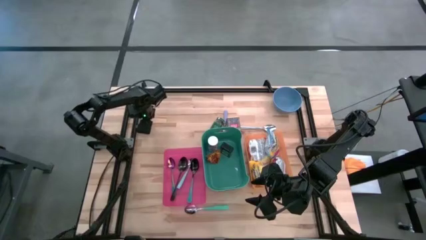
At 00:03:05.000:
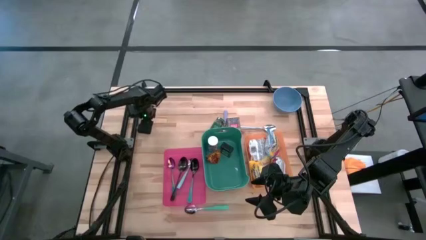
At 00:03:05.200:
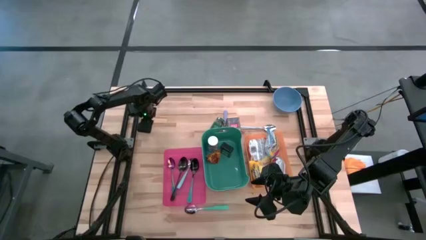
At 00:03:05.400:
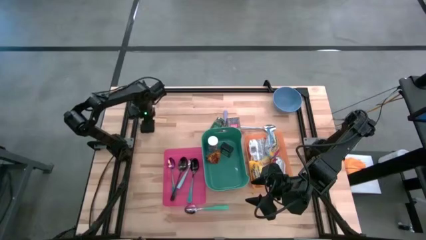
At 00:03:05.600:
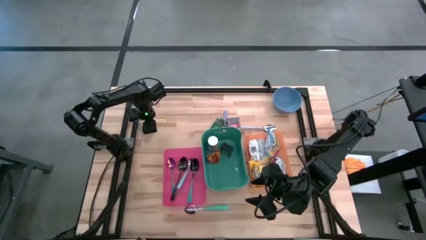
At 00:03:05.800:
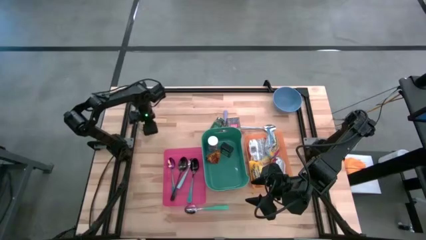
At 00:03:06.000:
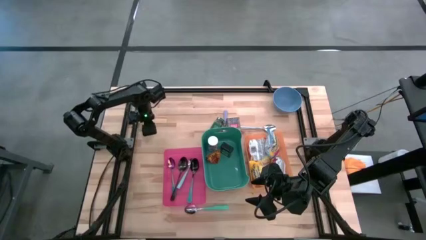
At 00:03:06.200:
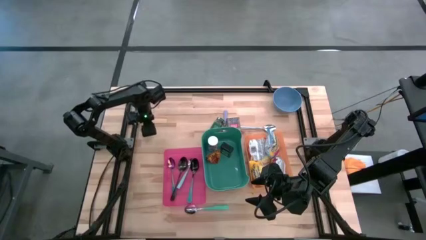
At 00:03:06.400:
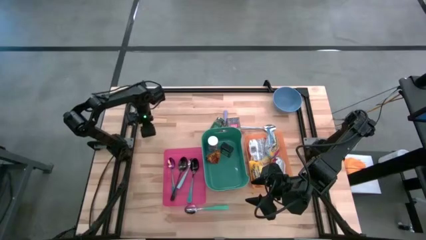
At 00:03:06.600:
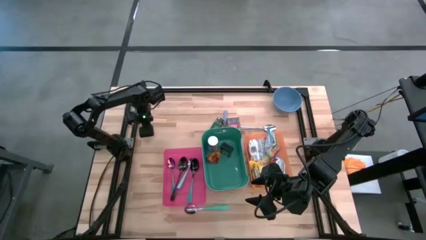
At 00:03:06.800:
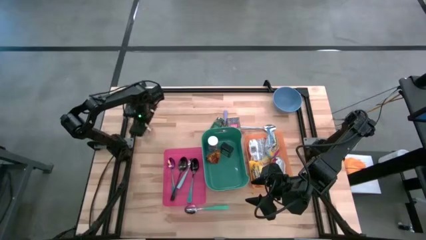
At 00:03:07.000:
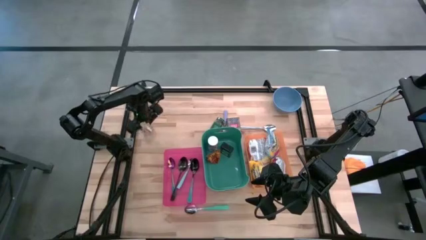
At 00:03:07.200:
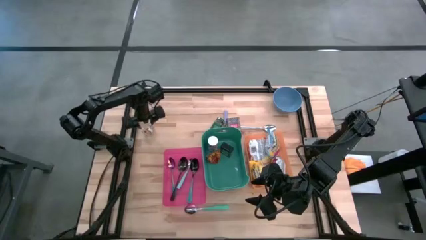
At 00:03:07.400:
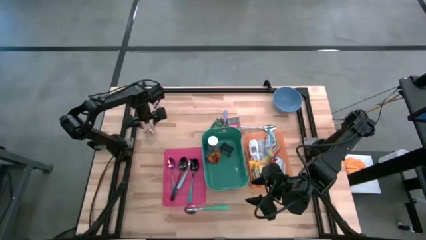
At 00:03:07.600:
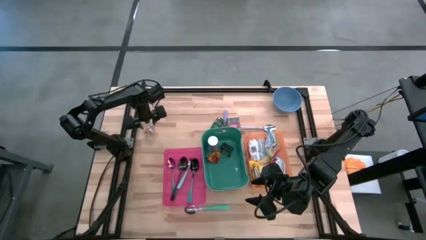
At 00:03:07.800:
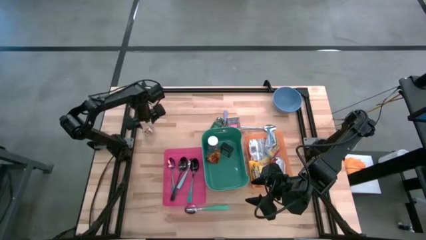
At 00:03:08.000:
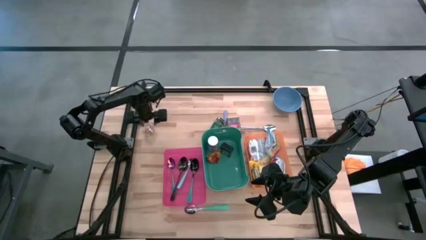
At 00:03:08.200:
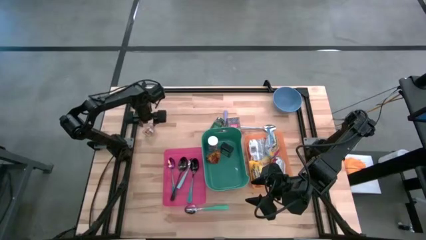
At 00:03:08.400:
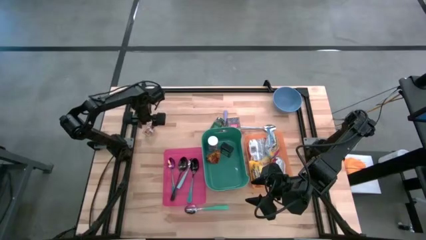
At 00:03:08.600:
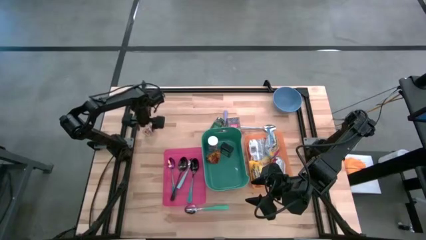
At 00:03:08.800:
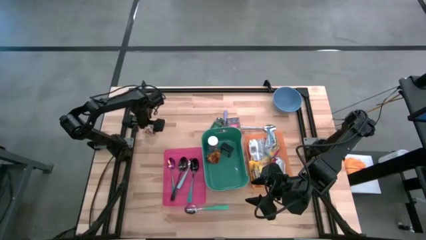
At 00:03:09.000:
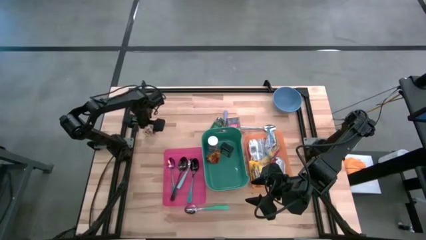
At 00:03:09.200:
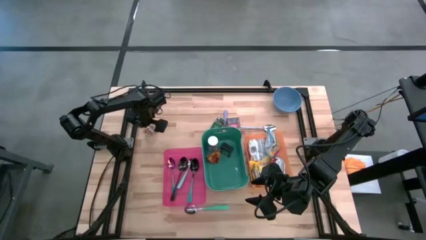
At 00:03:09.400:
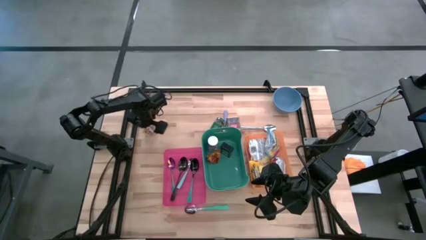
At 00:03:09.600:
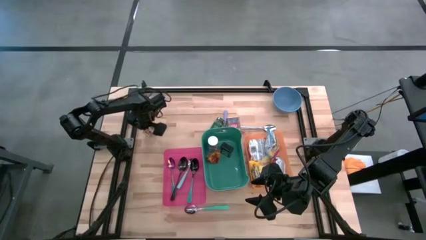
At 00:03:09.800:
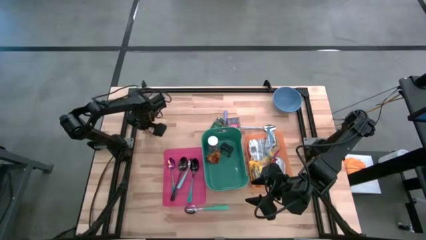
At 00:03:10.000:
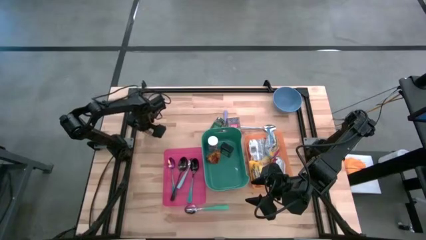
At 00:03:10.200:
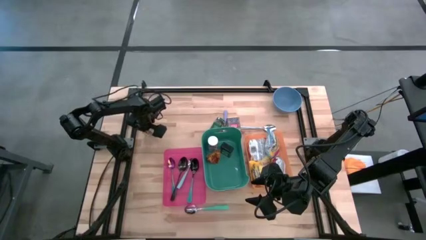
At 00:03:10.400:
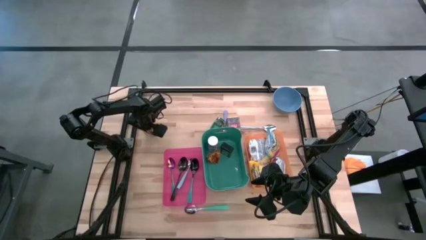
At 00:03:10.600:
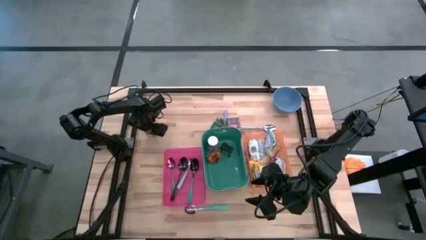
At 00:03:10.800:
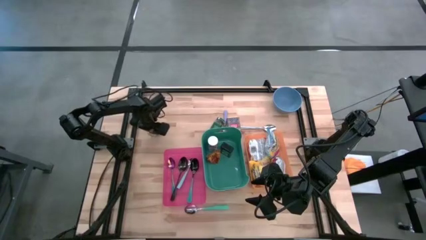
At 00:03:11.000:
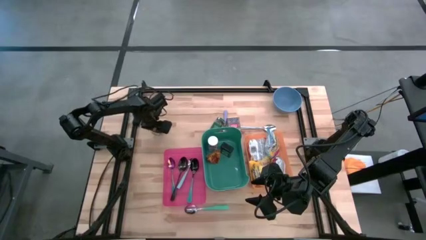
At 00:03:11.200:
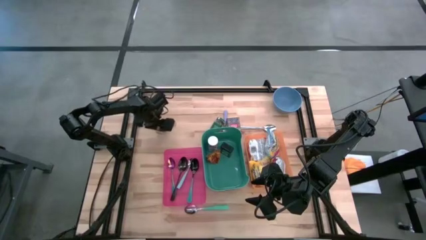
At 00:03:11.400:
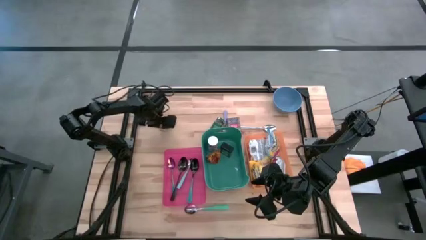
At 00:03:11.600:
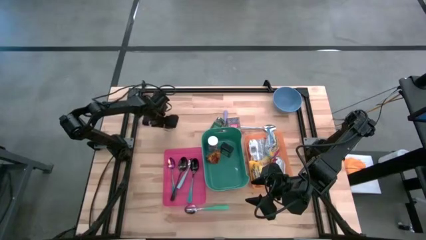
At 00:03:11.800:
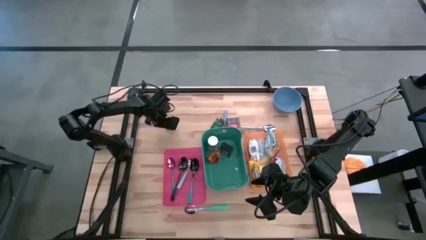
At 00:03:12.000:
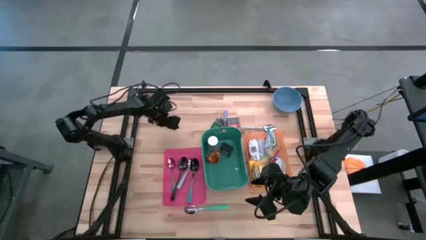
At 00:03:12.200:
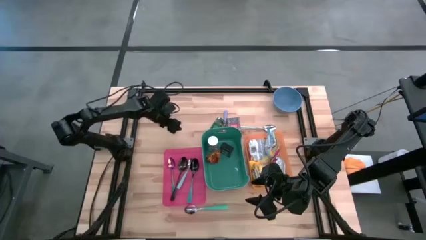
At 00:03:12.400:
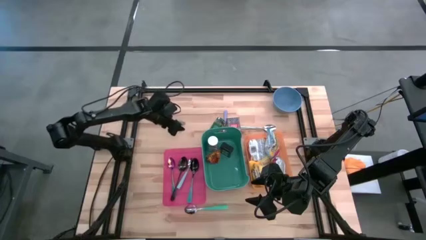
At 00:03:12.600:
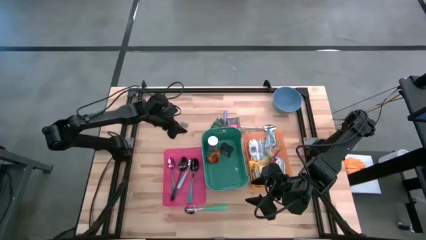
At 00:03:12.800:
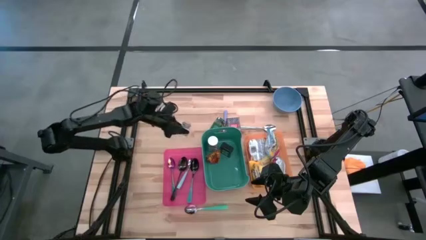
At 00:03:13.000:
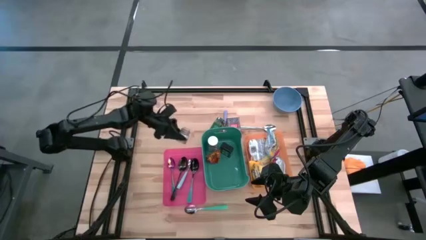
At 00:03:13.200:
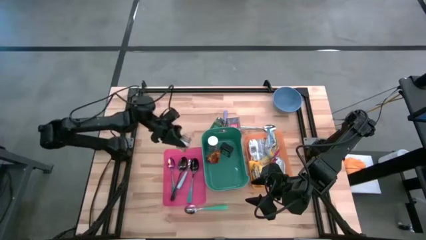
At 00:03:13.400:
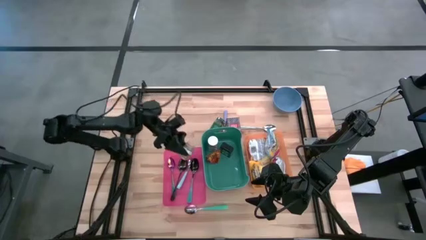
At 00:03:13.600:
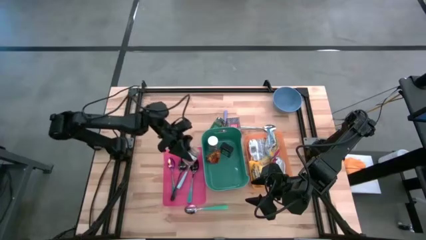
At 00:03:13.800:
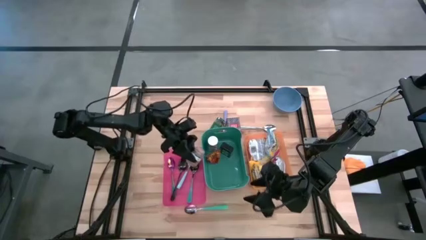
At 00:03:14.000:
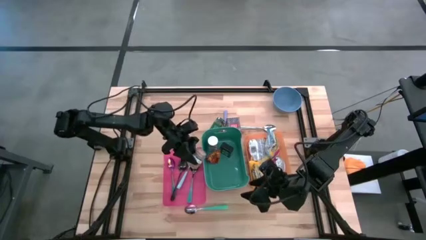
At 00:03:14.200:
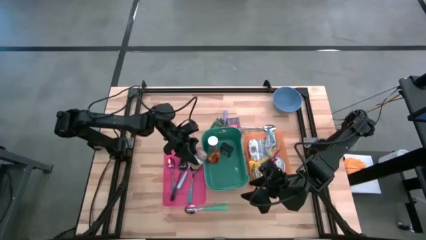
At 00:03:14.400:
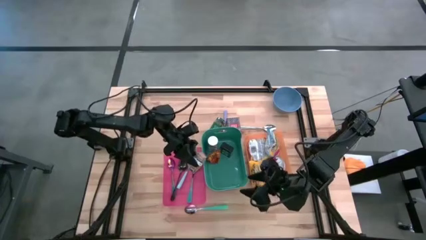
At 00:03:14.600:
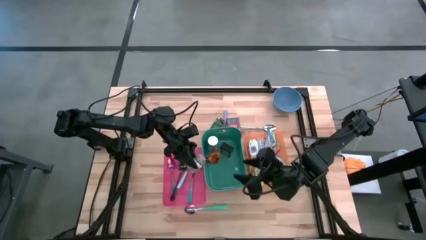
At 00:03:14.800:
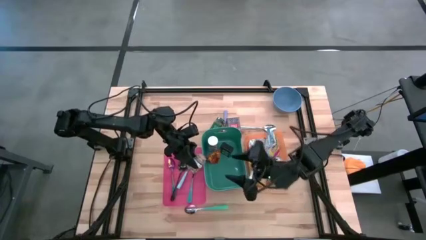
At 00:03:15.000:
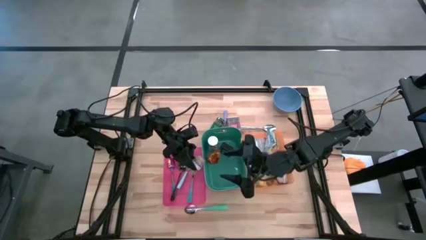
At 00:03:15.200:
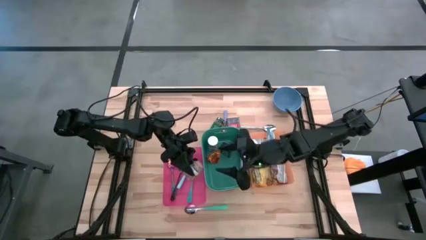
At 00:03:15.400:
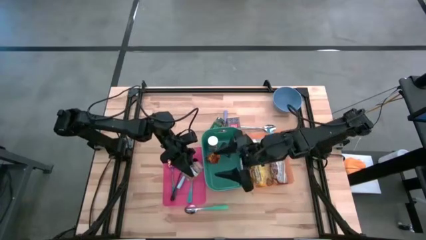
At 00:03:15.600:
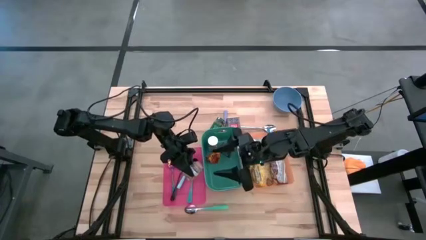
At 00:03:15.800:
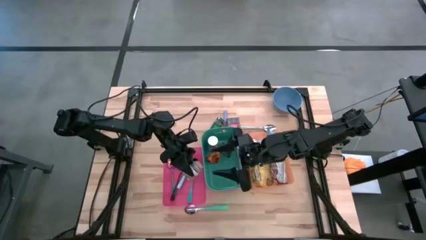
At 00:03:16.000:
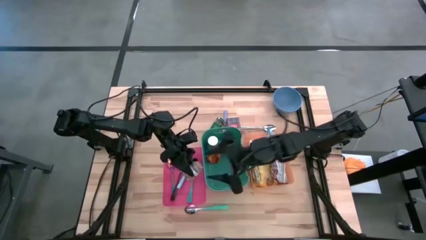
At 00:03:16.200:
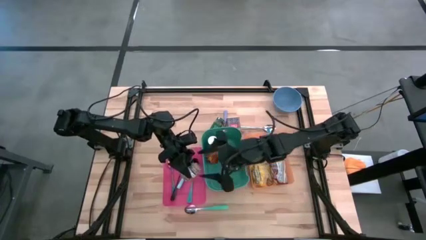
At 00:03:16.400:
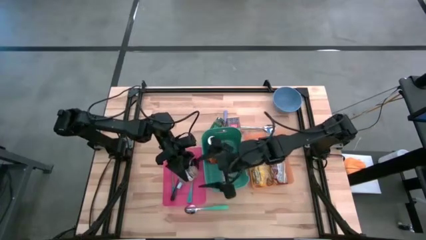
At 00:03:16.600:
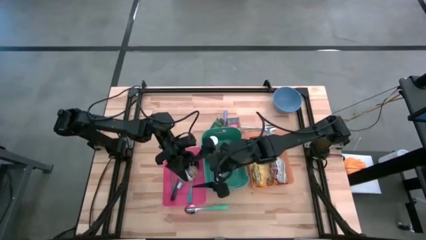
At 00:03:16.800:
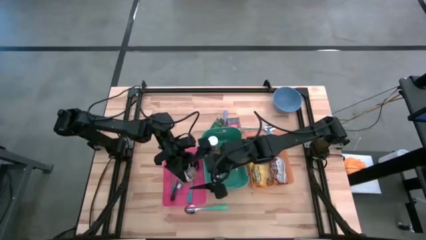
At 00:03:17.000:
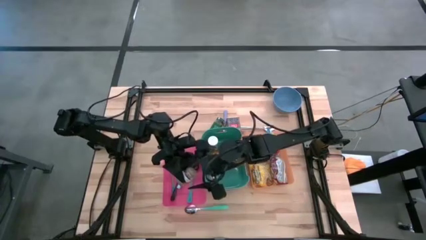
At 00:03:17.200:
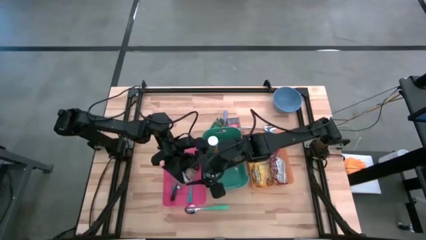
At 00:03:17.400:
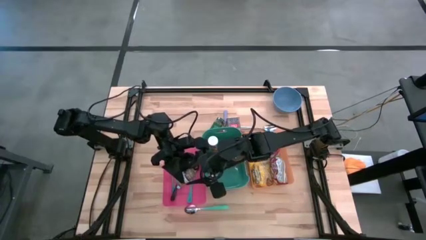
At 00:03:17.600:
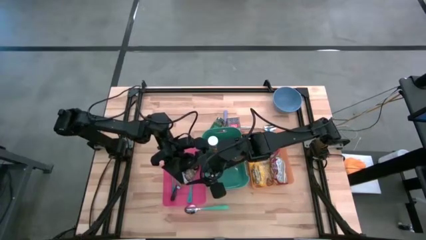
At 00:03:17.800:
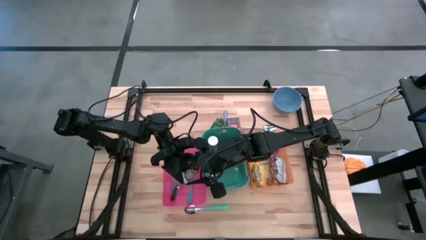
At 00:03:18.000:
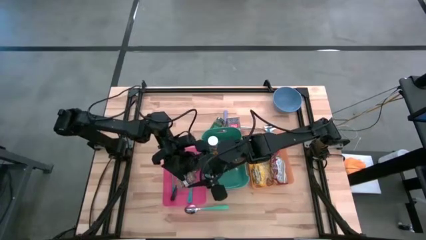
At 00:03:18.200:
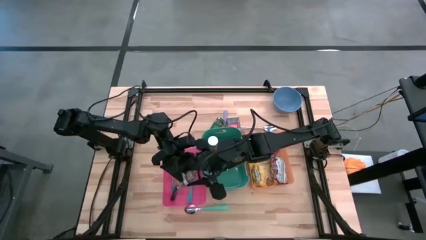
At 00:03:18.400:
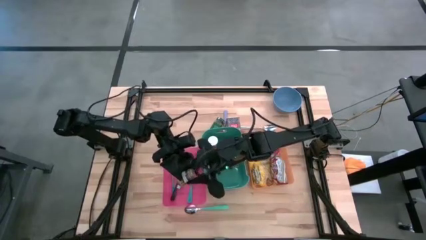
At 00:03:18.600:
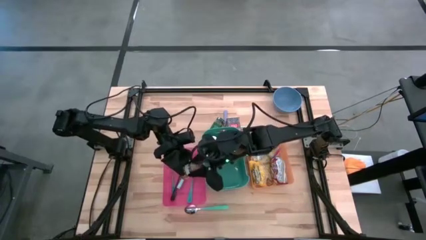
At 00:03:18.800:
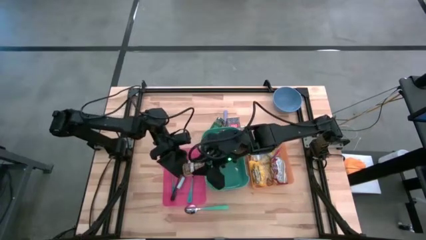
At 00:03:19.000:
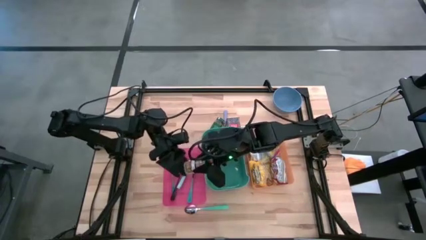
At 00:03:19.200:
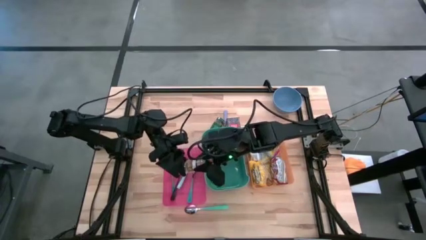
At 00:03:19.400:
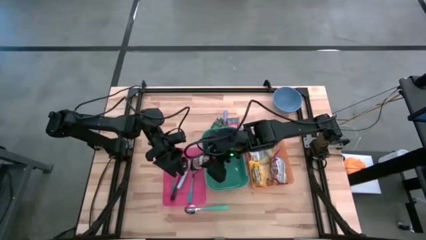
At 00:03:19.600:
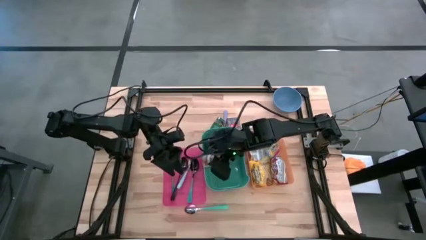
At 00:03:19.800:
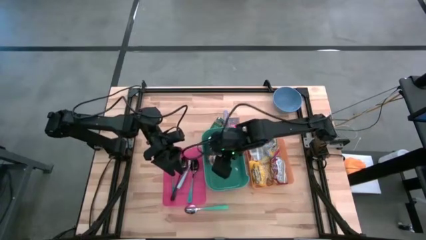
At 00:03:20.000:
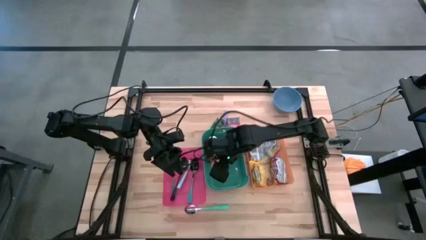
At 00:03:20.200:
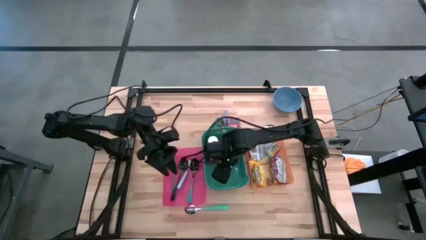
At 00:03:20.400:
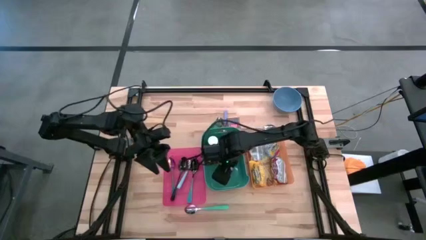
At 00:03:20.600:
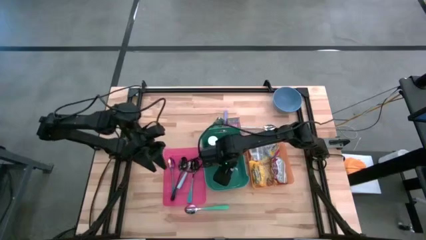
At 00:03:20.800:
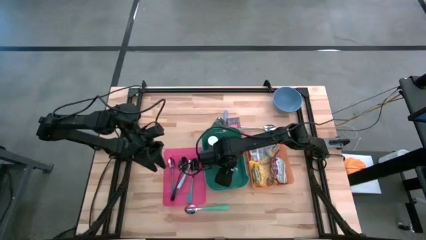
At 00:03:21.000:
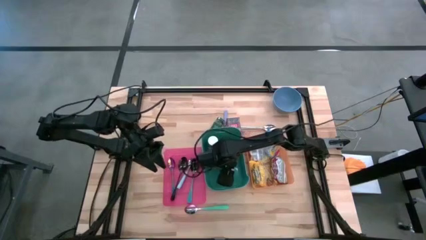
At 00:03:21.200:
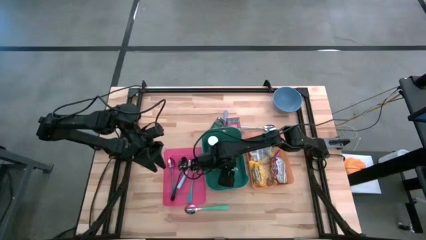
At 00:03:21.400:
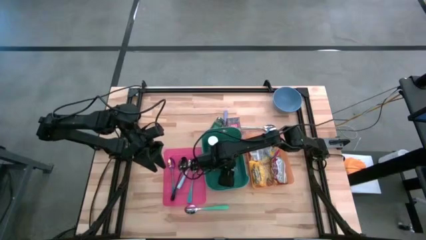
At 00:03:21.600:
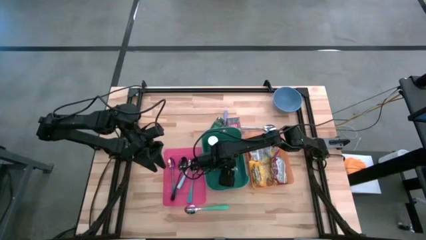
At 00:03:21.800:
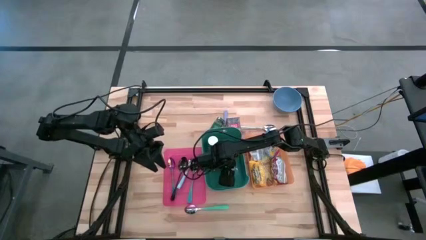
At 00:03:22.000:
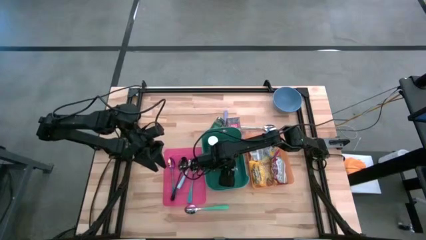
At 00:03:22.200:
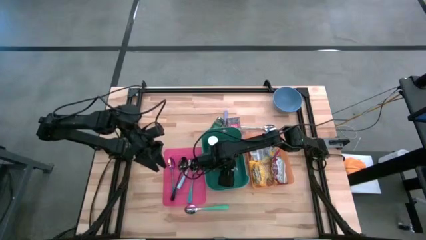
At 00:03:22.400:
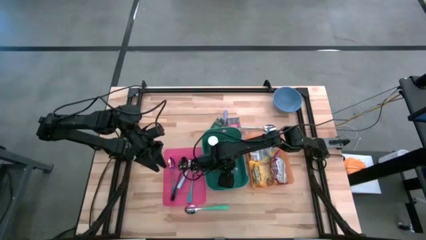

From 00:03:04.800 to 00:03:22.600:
Put the brown seasoning bottle into the green bin
